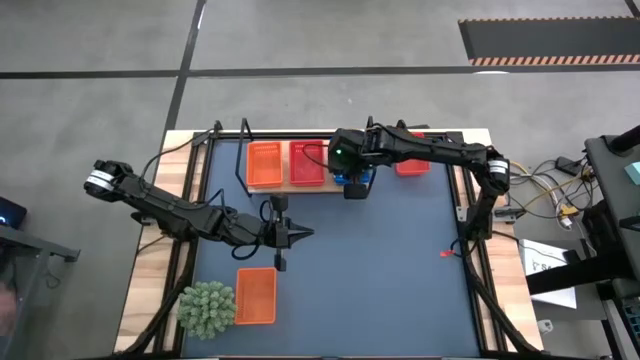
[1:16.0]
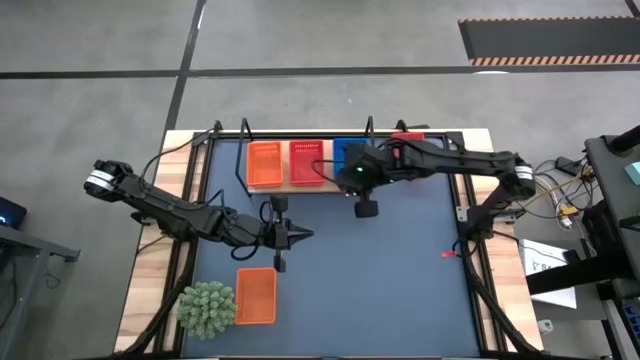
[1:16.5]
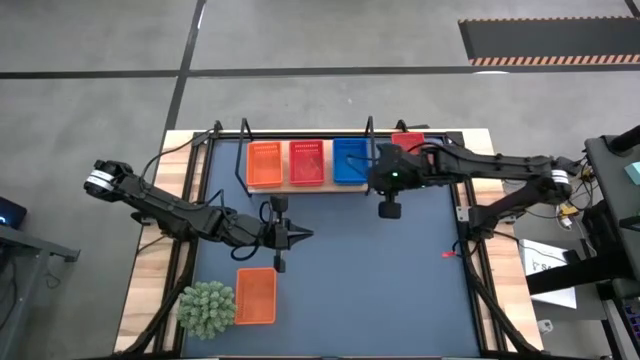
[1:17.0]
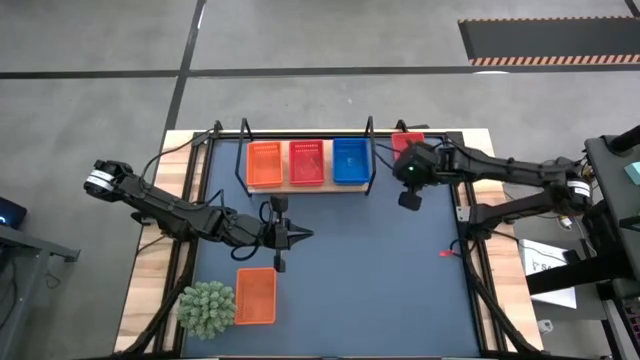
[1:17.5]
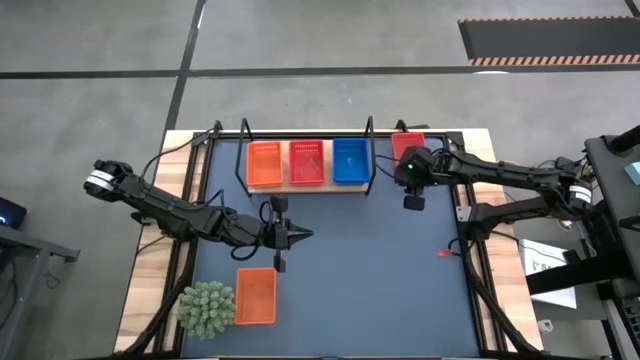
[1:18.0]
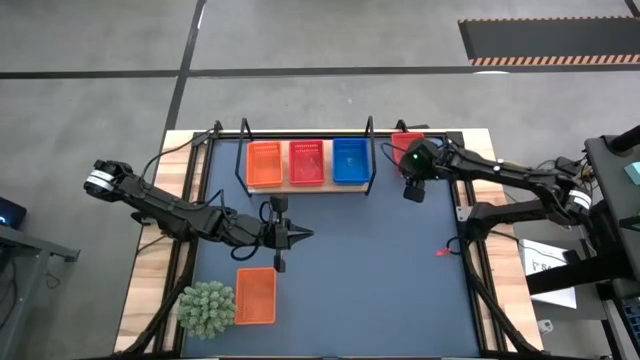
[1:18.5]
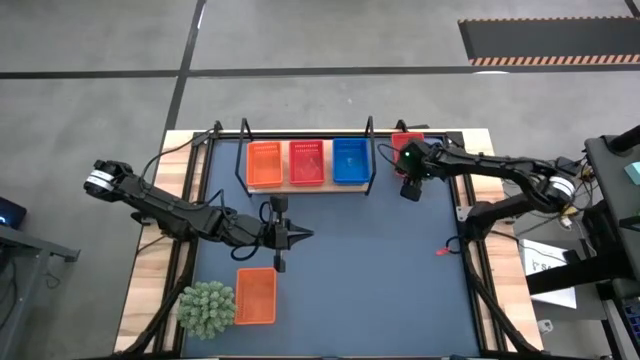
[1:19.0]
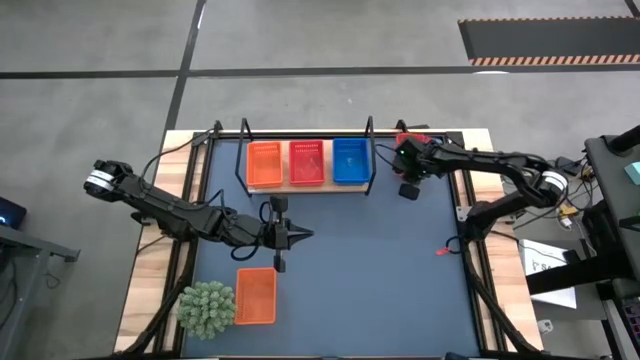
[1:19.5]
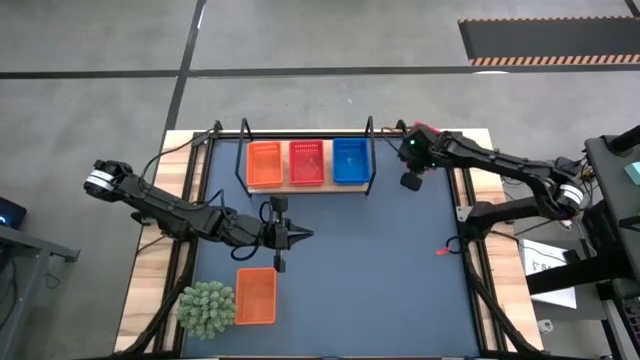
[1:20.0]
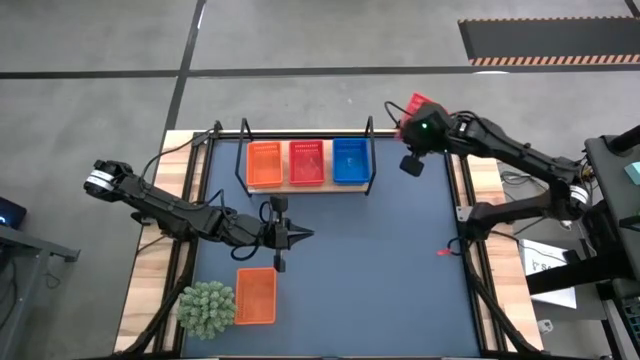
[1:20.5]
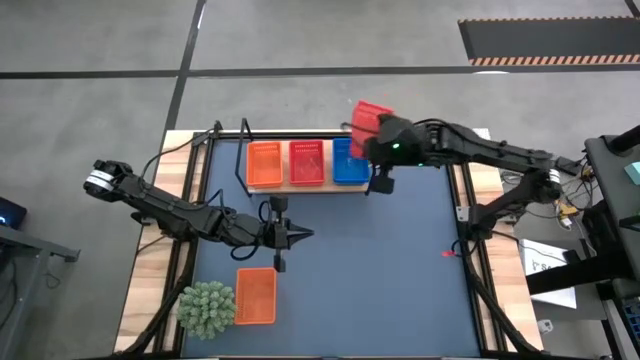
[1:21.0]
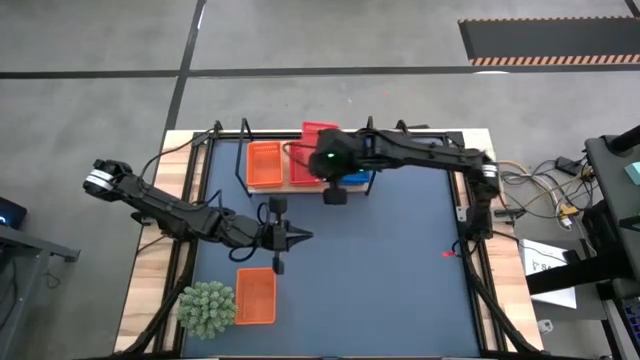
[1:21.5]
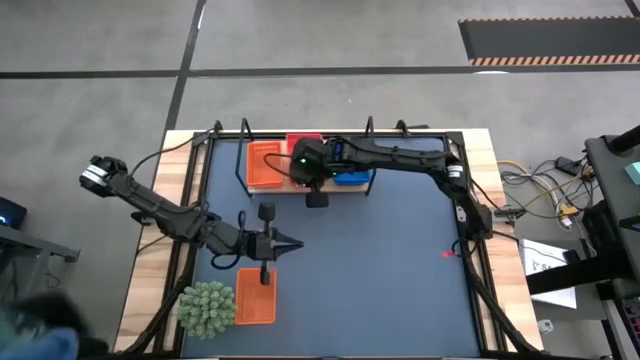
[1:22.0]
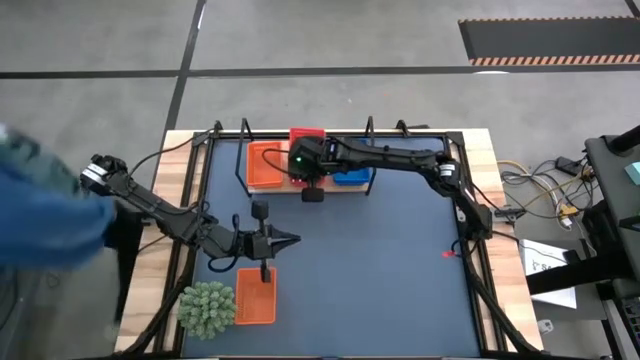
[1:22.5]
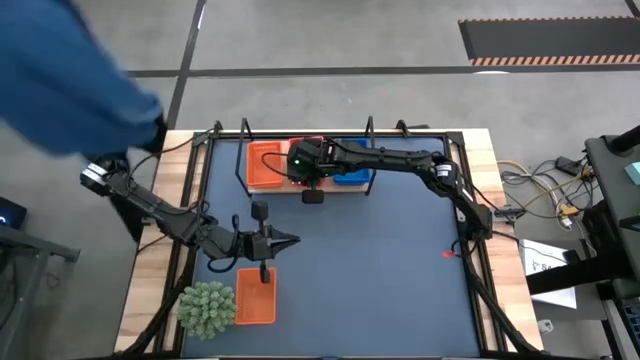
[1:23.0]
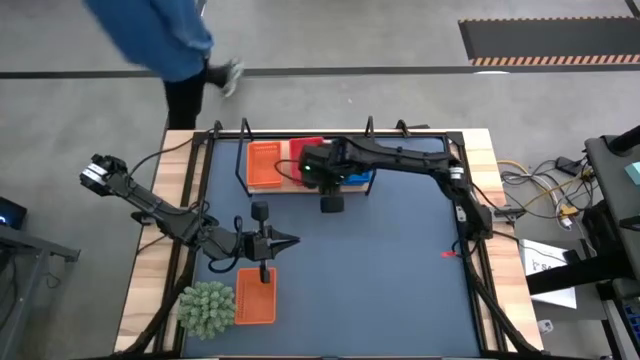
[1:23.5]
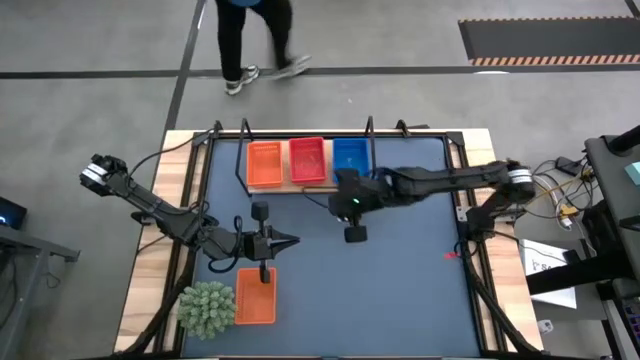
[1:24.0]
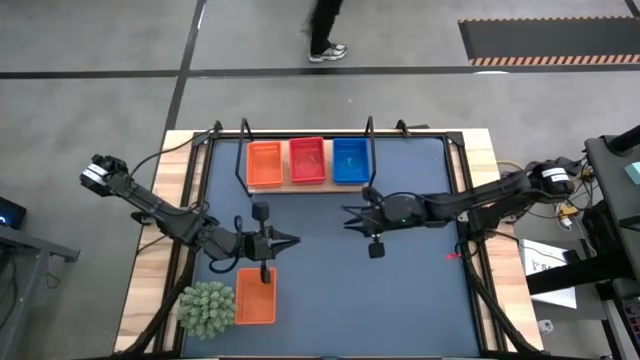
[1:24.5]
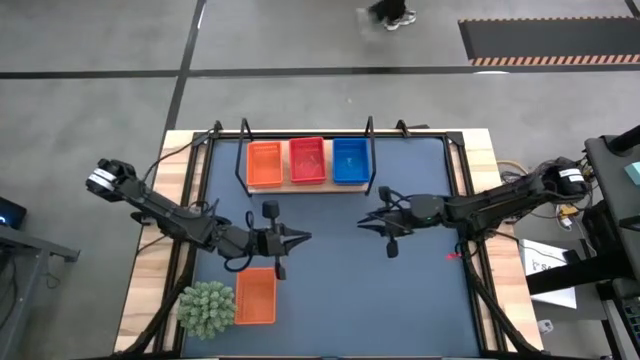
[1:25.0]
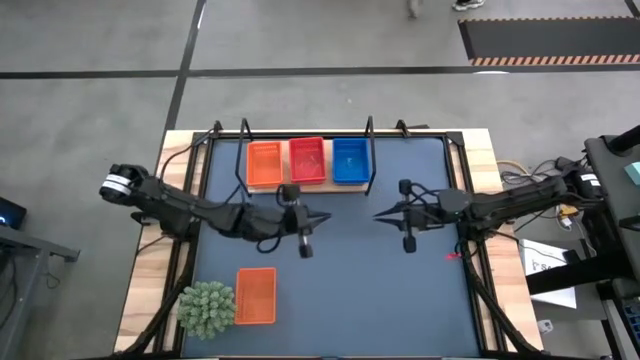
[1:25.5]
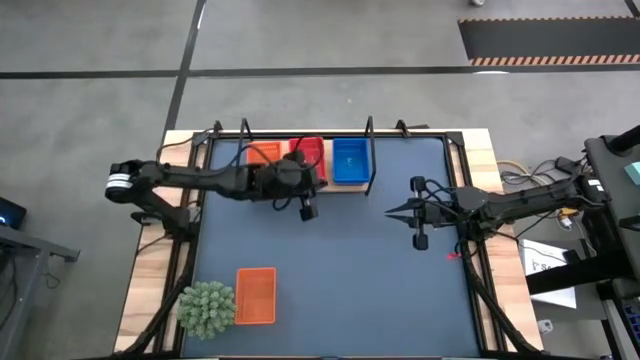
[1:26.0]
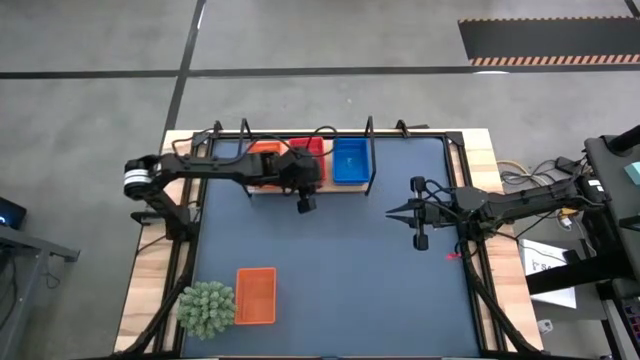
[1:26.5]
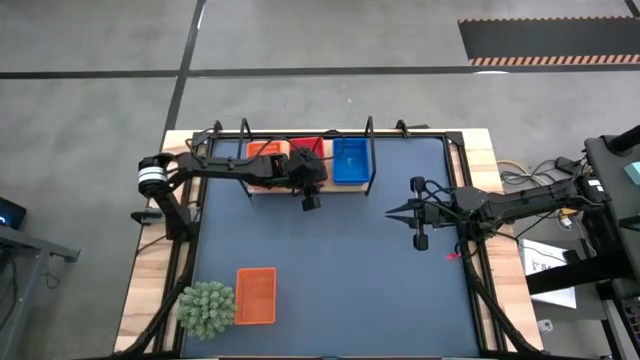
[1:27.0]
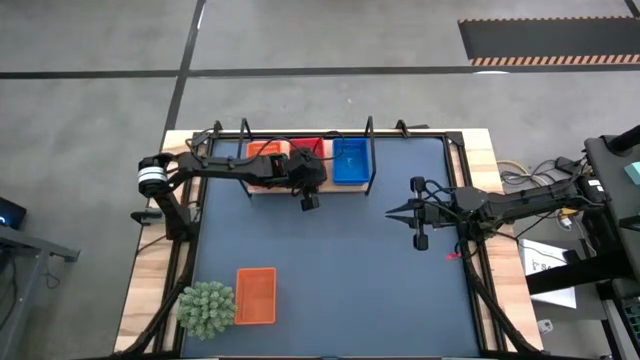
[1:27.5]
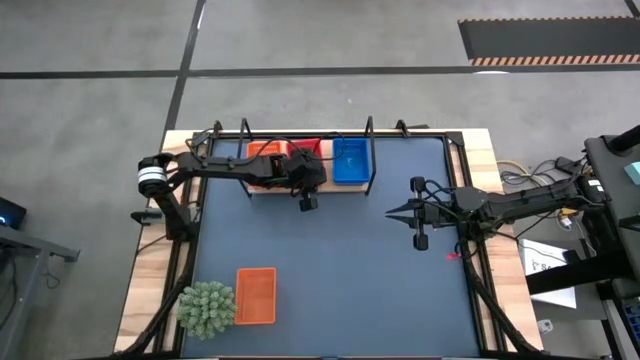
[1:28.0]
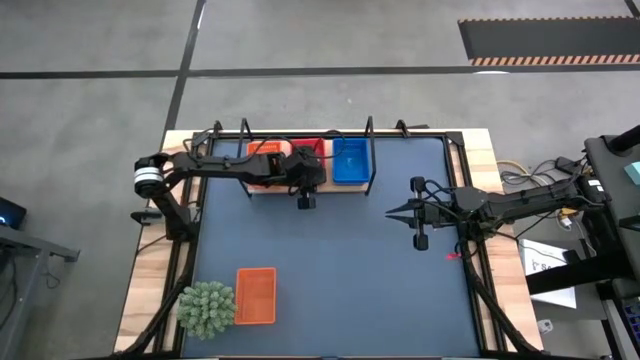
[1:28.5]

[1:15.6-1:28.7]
Task: Stack baskets on shelf by color
Stack the red basket on top of the red baskets on the shelf

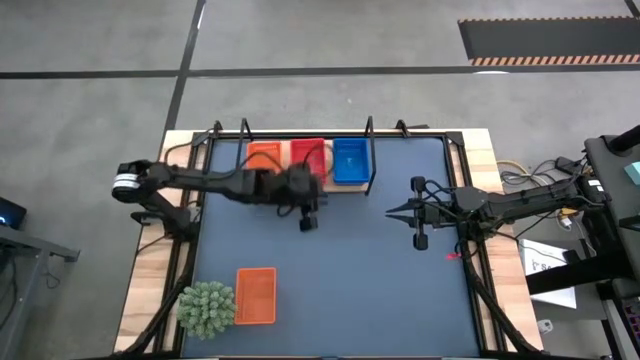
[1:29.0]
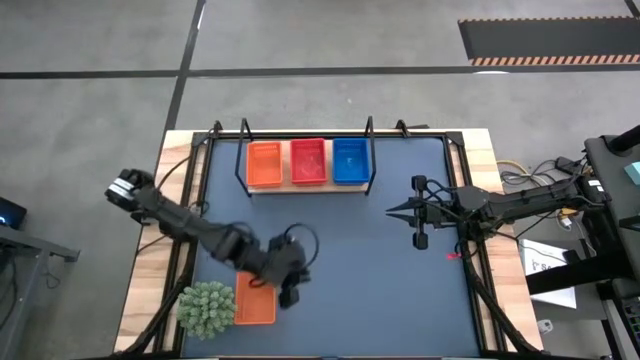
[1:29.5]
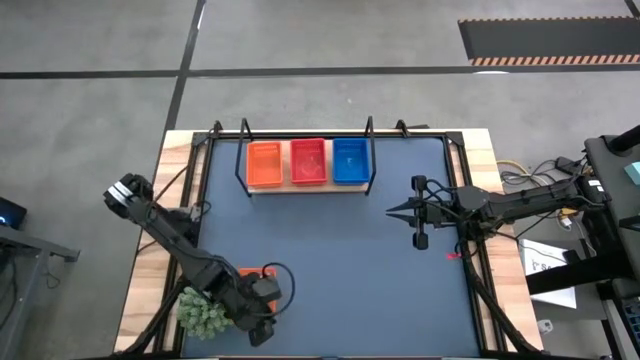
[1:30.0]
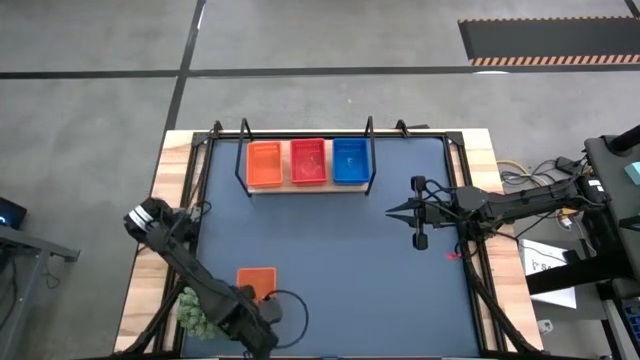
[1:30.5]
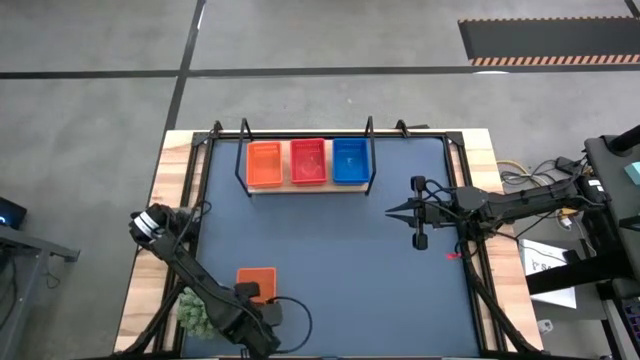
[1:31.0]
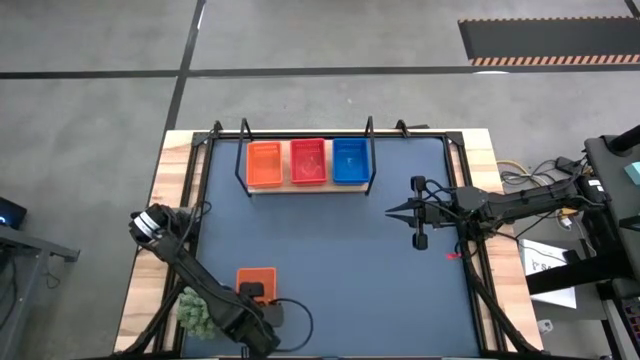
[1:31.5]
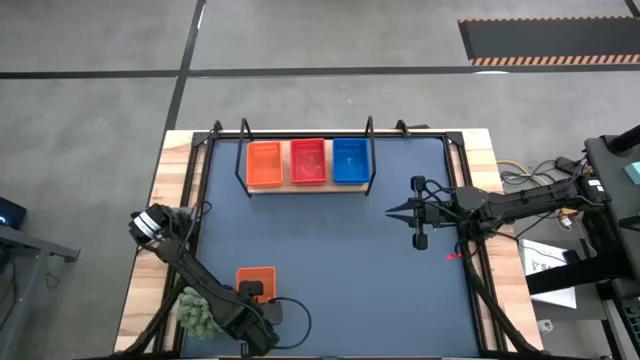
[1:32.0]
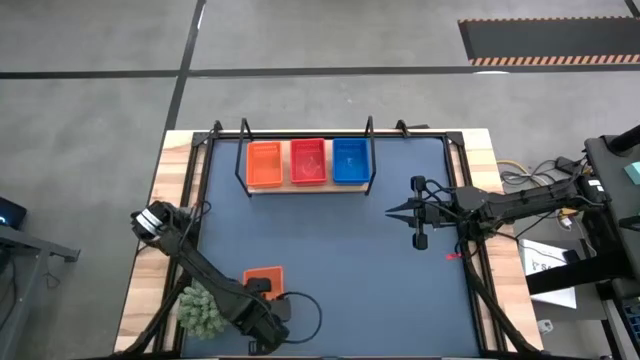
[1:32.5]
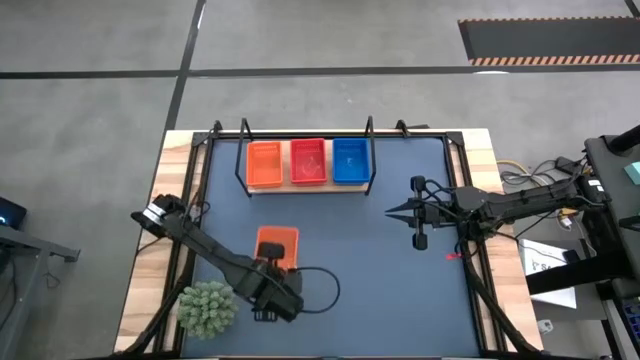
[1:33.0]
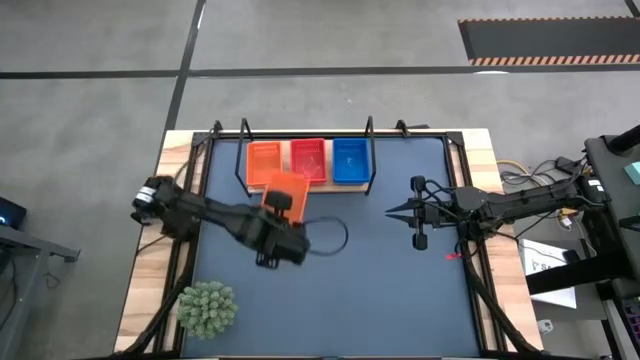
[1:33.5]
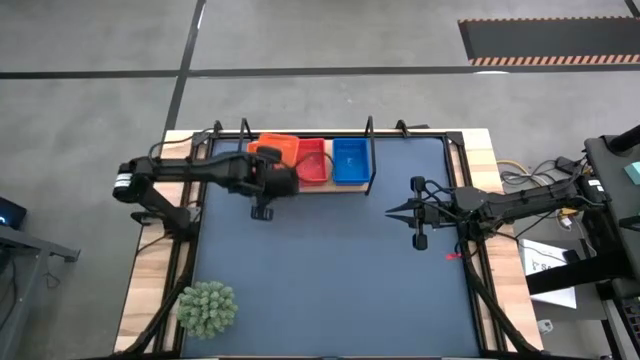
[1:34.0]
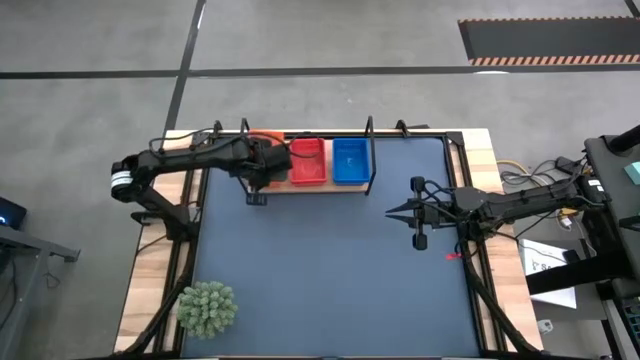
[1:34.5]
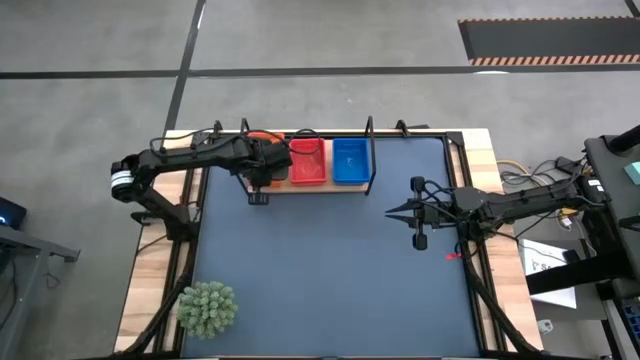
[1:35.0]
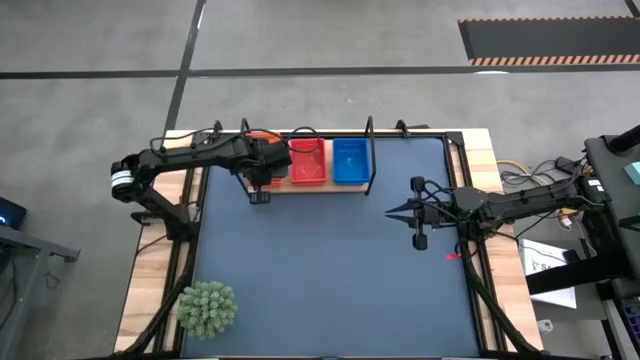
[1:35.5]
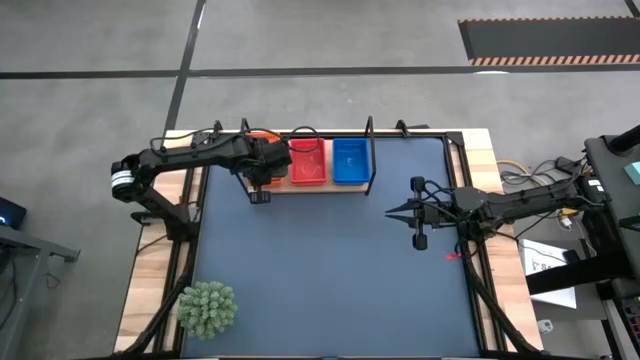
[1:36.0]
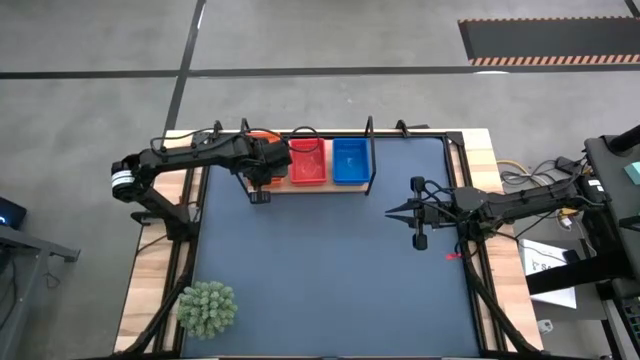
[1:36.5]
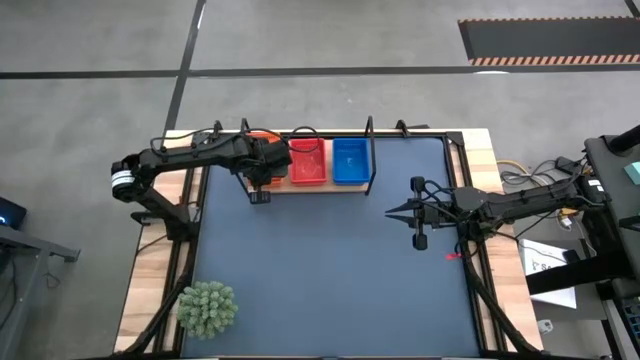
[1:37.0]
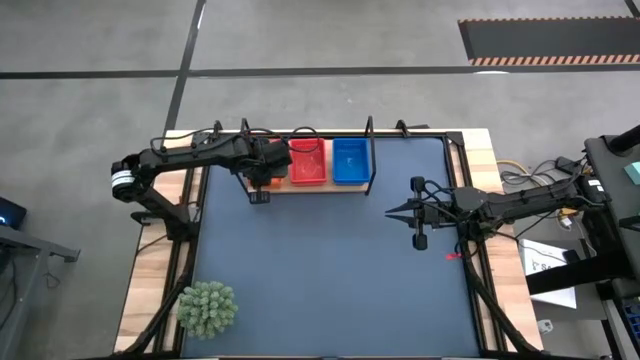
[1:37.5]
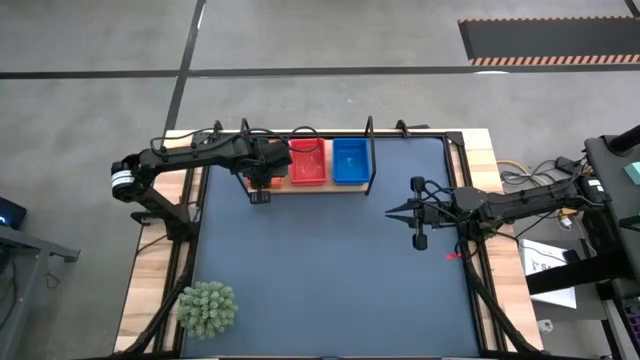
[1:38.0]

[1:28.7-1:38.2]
Stack the orange basket on top of the orange baskets on the shelf
